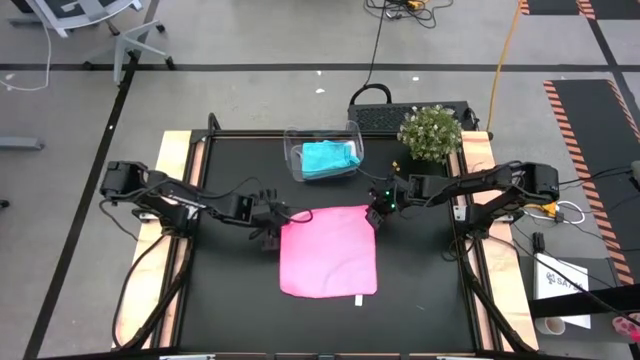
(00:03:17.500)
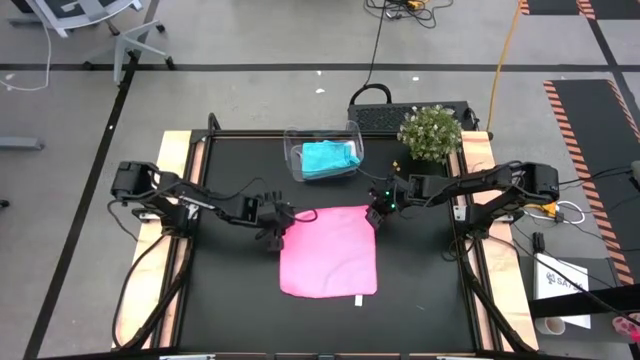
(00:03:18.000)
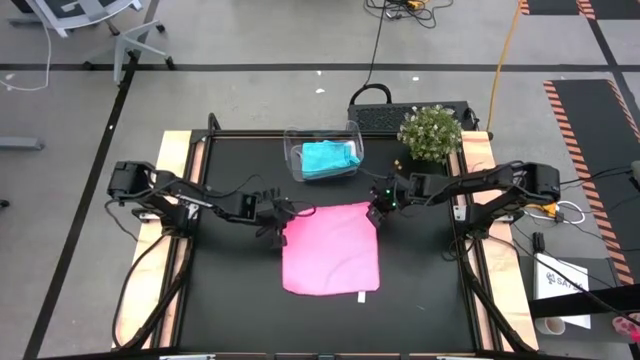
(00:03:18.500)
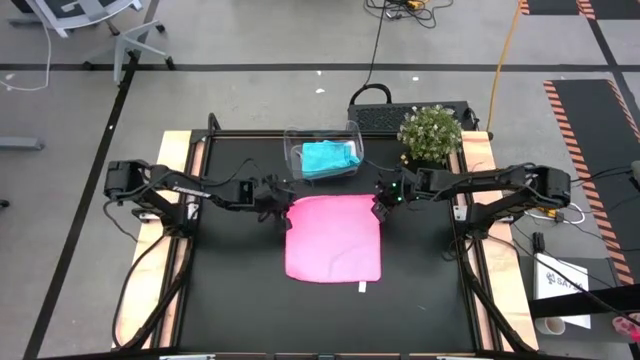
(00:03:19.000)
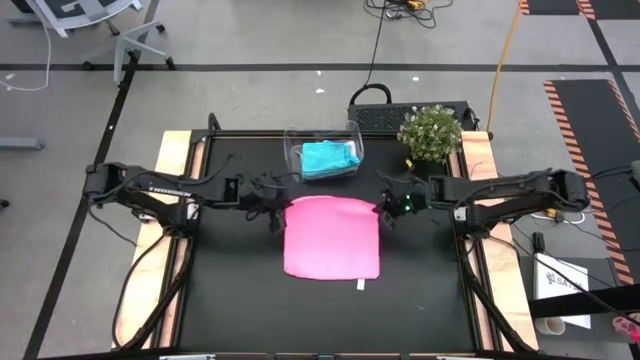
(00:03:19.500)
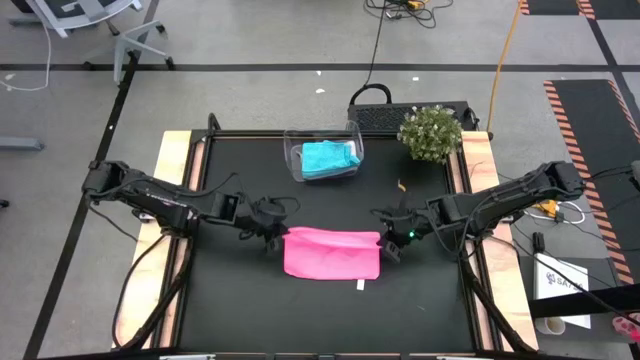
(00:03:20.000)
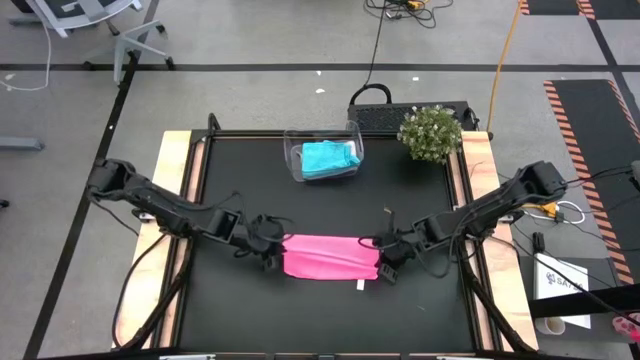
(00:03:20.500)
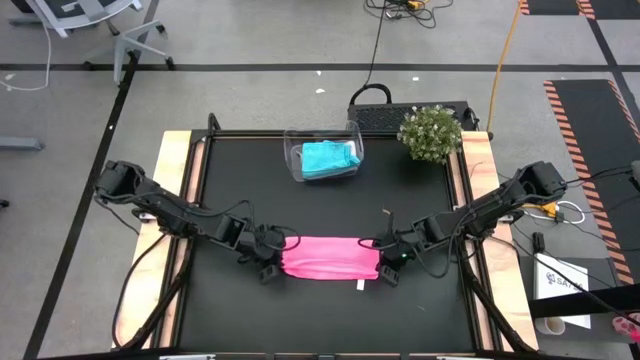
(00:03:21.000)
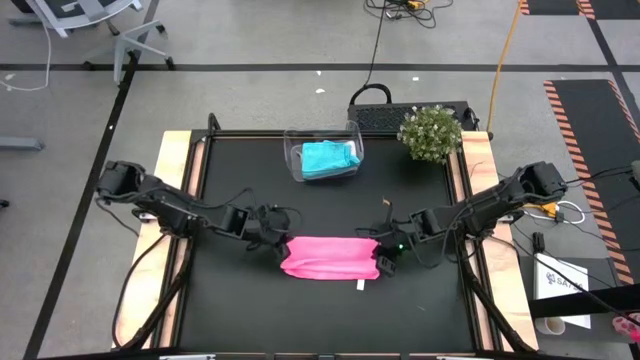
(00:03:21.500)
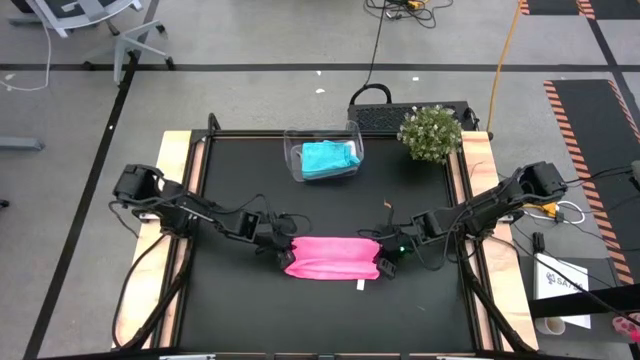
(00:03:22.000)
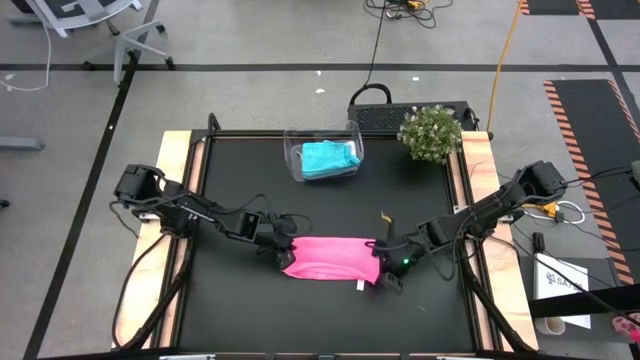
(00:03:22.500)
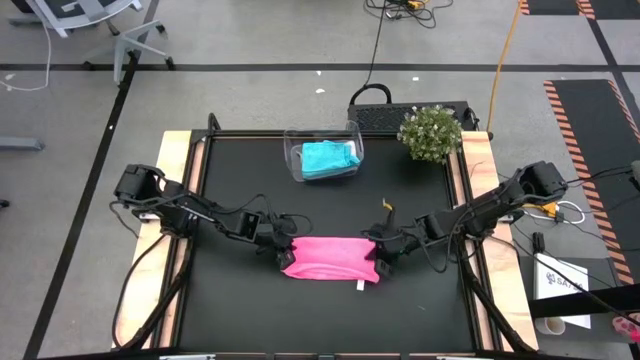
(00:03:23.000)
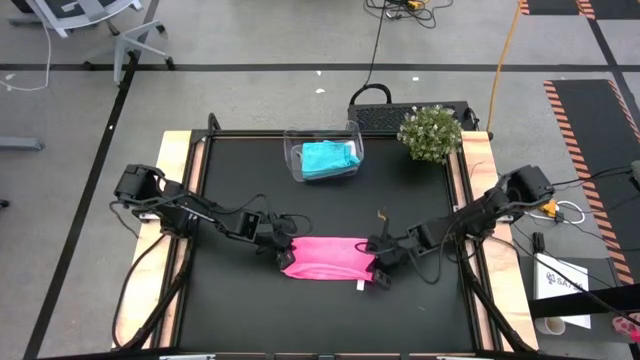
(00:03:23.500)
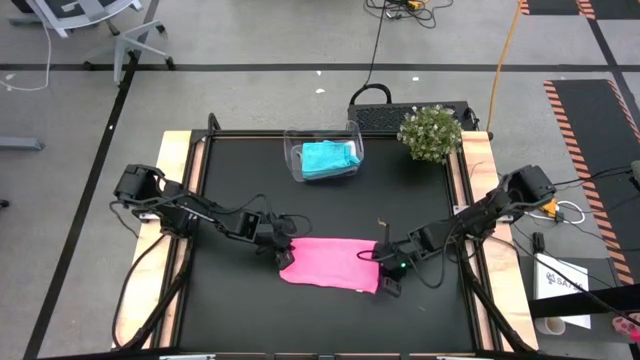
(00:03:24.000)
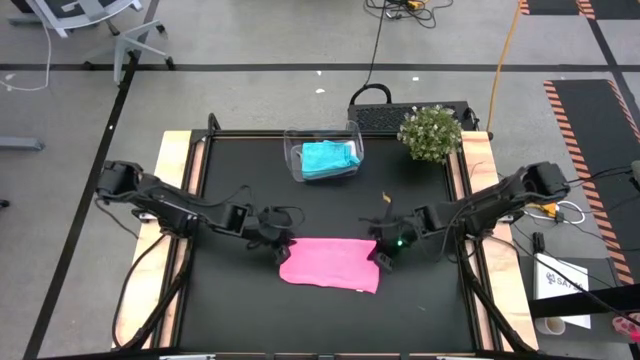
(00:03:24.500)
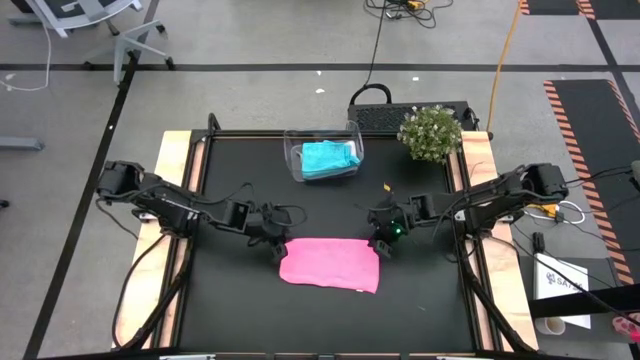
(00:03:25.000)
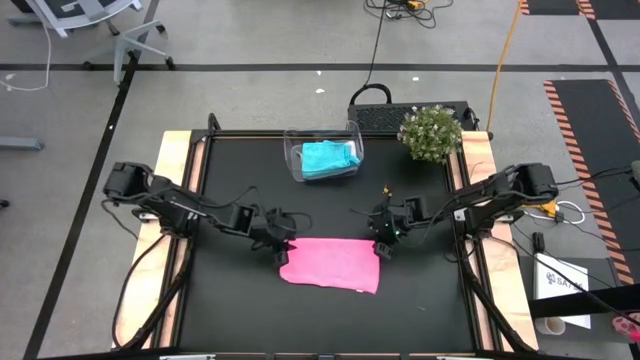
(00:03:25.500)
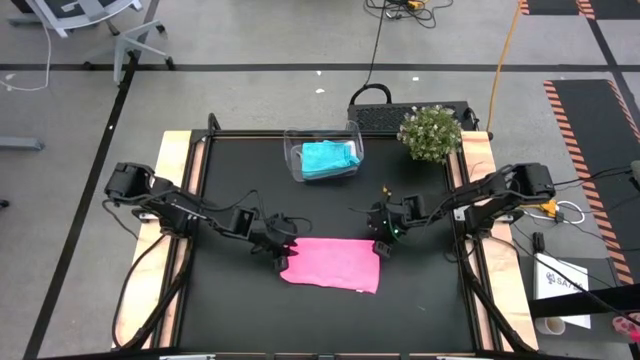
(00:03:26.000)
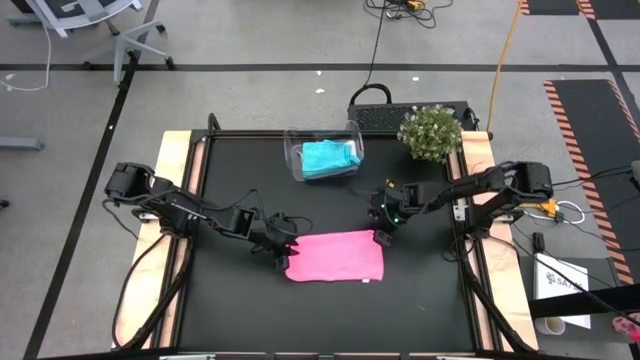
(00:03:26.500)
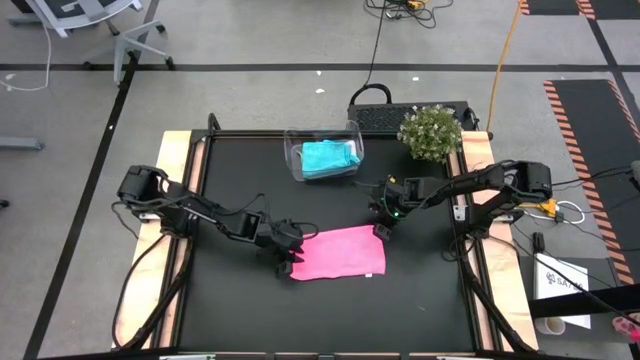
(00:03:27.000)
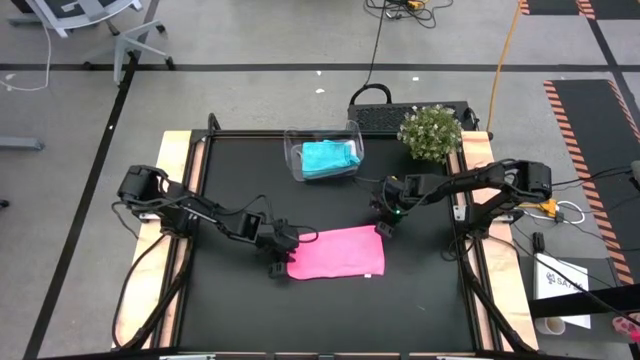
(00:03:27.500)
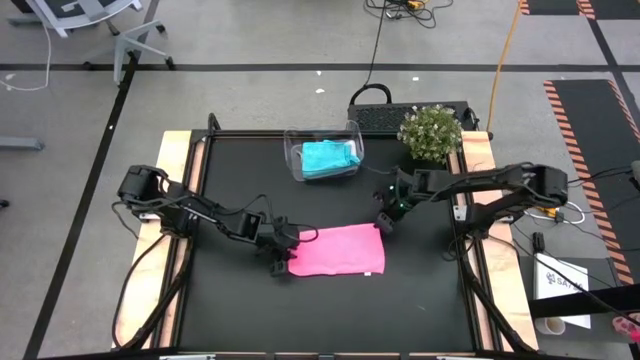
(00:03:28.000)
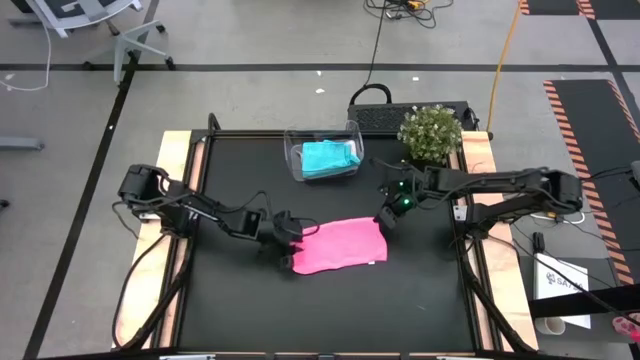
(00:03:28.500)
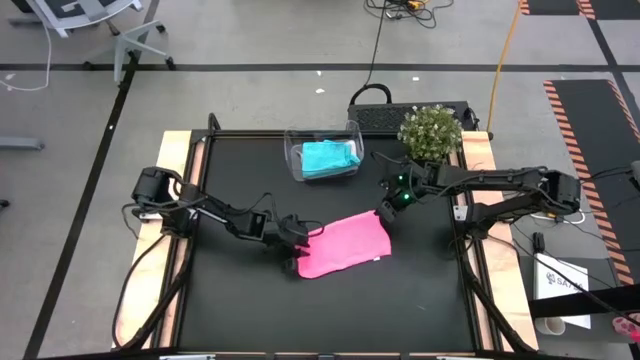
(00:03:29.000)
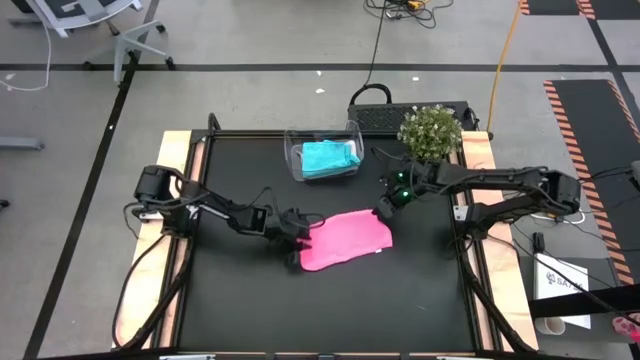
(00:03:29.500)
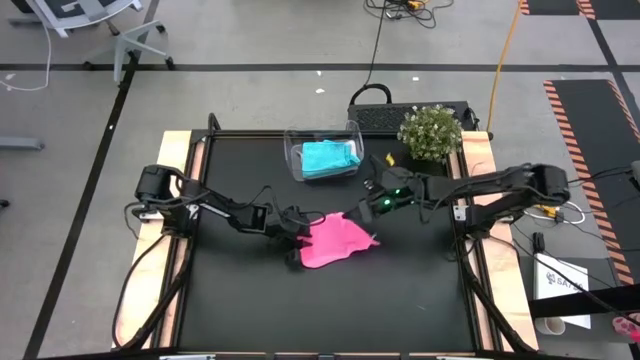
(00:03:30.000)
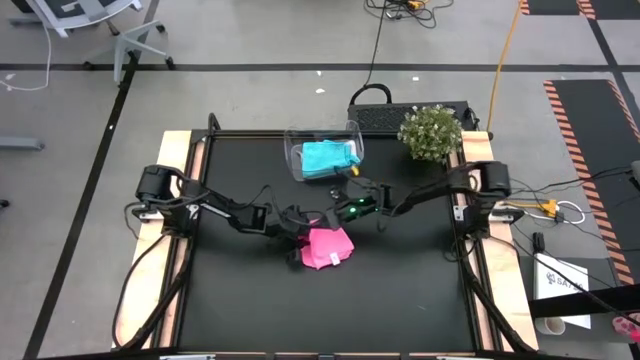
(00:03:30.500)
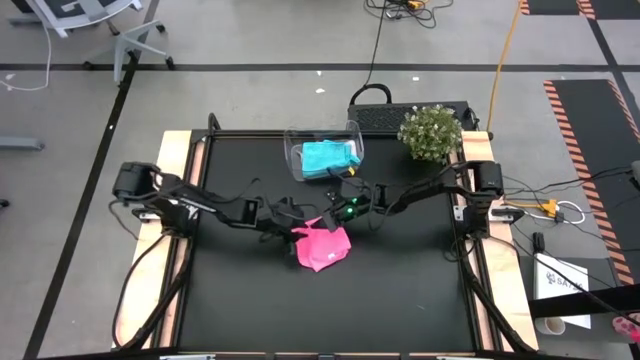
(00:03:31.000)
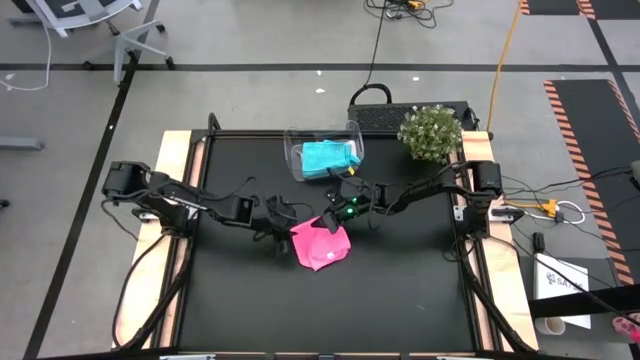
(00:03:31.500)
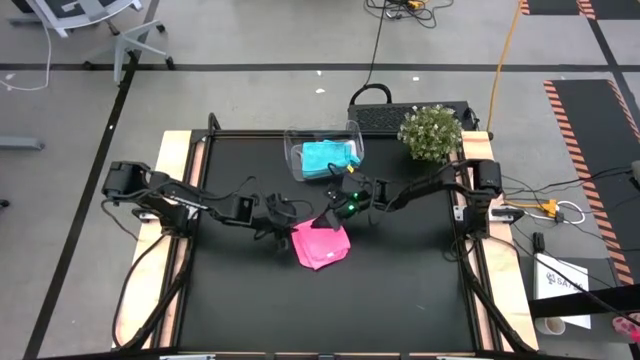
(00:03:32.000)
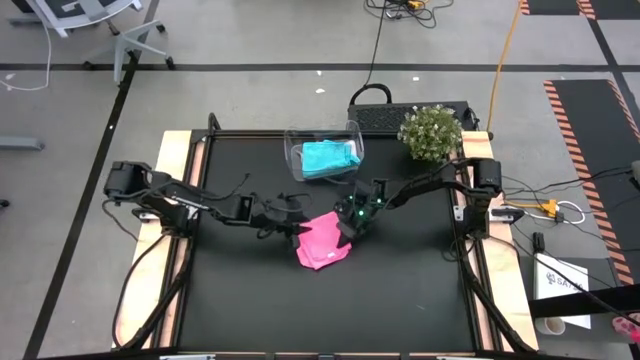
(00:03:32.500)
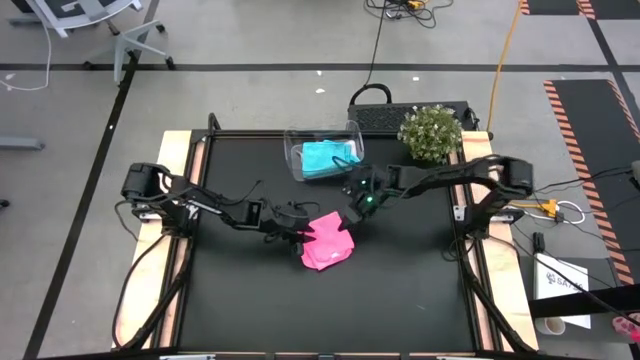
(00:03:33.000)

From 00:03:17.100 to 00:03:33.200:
Task: Fold microfiber towels
Fold the pink microfiber cloth
